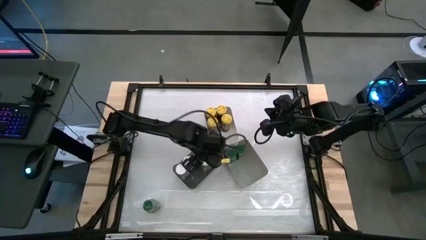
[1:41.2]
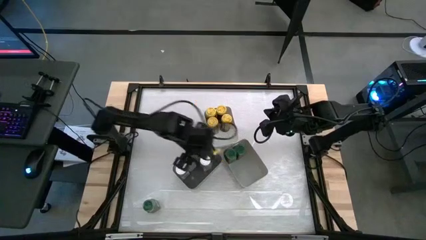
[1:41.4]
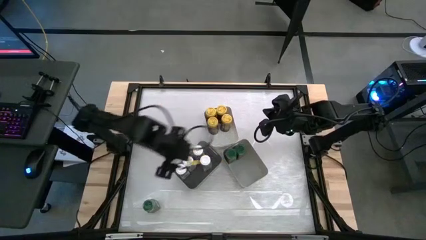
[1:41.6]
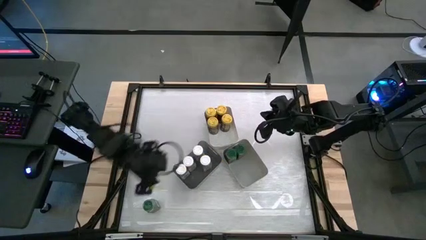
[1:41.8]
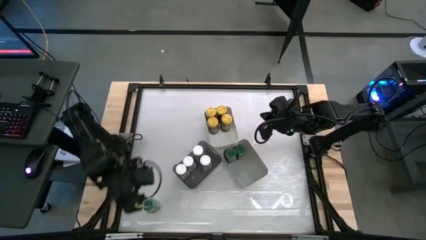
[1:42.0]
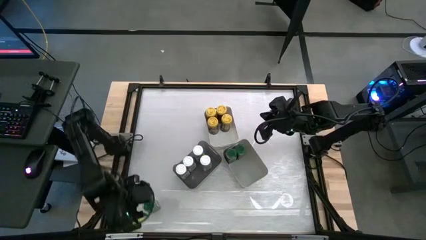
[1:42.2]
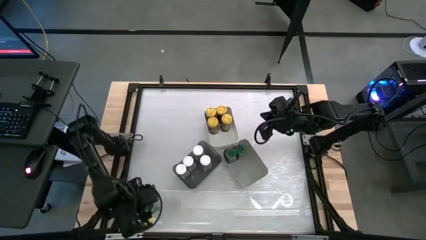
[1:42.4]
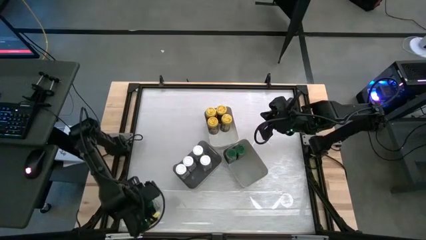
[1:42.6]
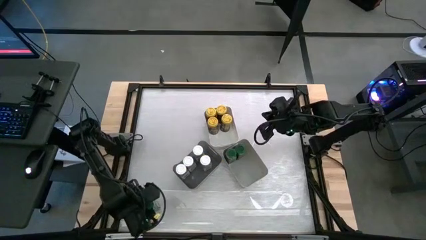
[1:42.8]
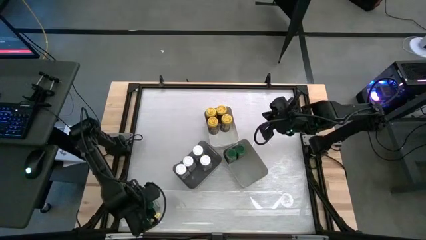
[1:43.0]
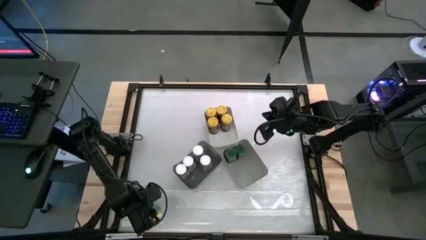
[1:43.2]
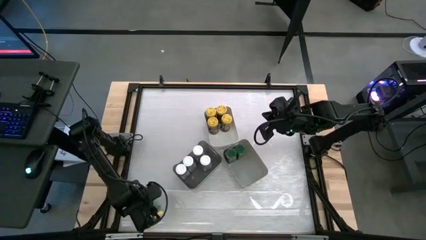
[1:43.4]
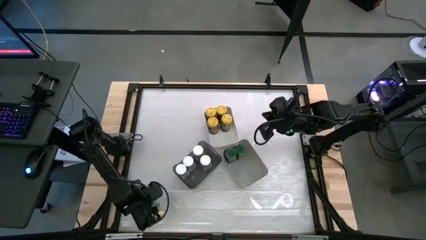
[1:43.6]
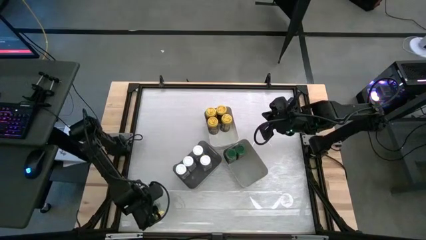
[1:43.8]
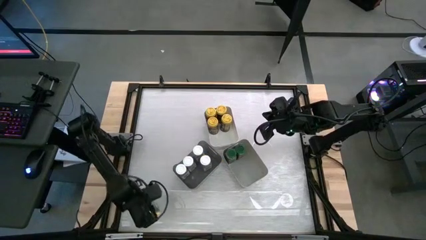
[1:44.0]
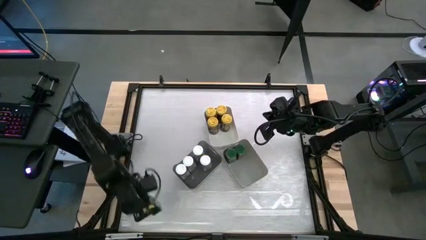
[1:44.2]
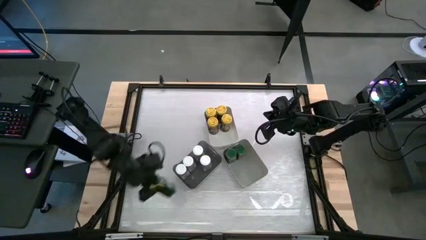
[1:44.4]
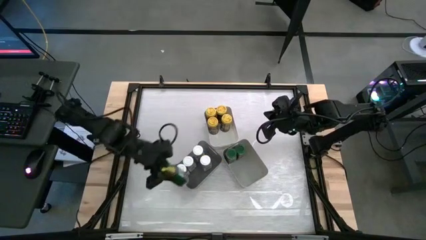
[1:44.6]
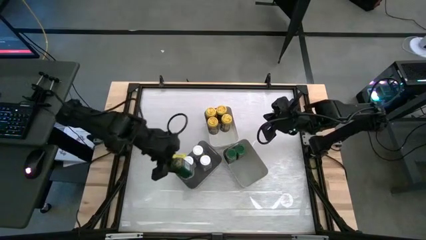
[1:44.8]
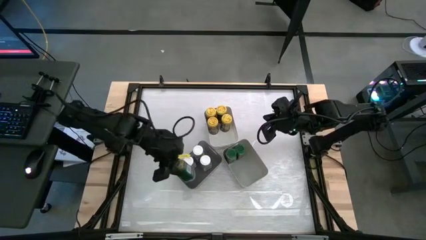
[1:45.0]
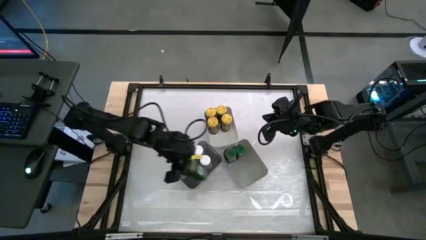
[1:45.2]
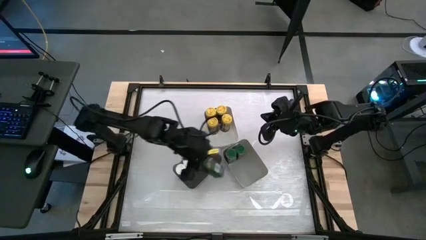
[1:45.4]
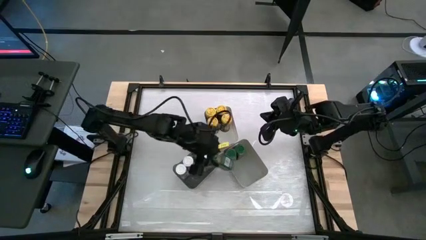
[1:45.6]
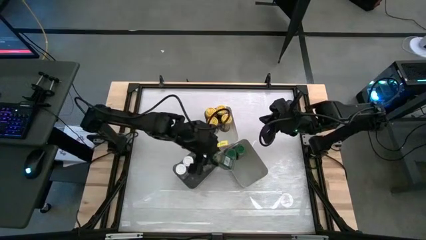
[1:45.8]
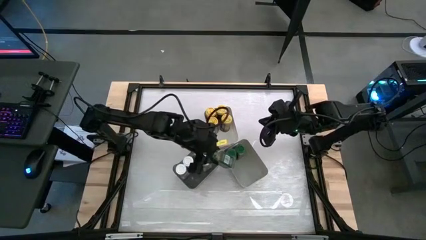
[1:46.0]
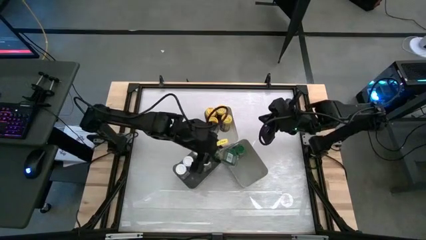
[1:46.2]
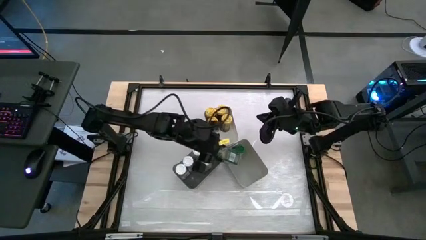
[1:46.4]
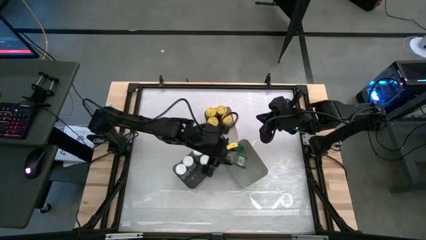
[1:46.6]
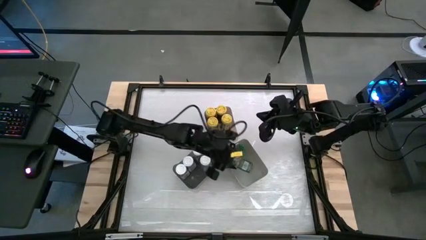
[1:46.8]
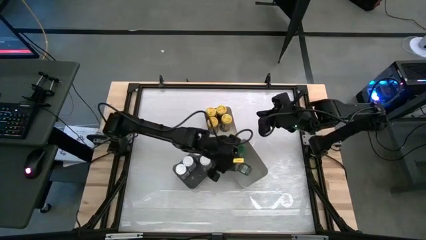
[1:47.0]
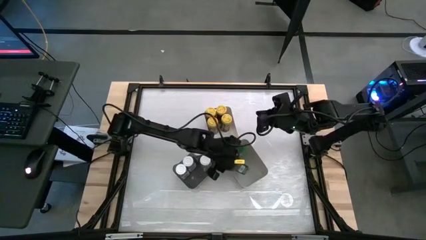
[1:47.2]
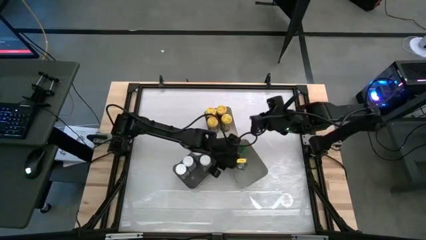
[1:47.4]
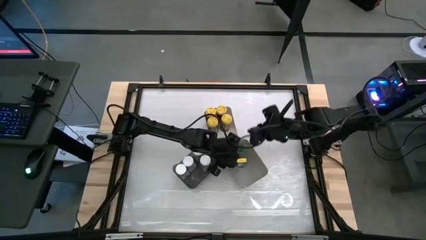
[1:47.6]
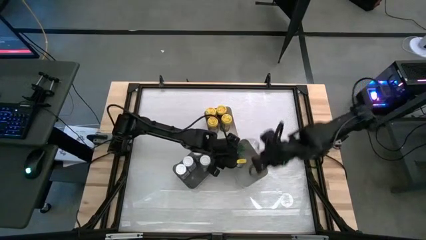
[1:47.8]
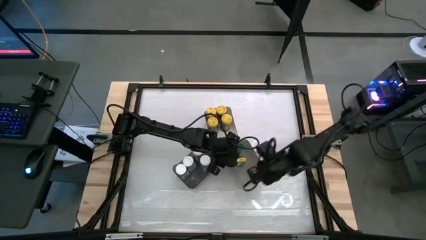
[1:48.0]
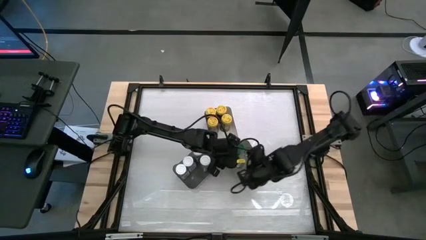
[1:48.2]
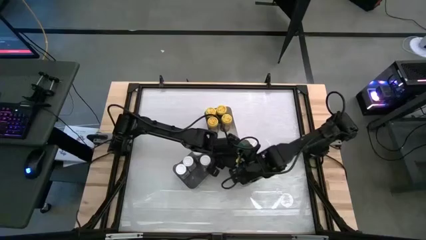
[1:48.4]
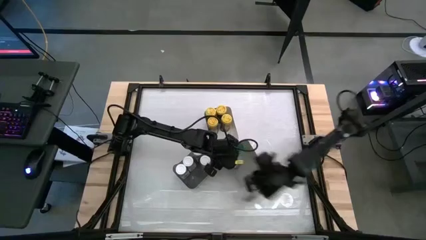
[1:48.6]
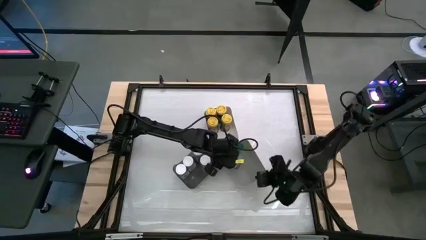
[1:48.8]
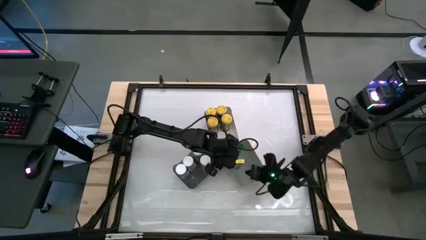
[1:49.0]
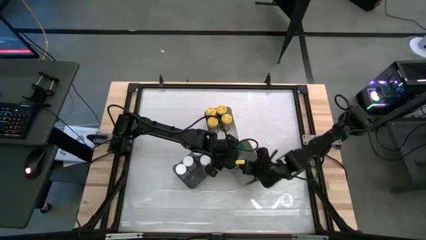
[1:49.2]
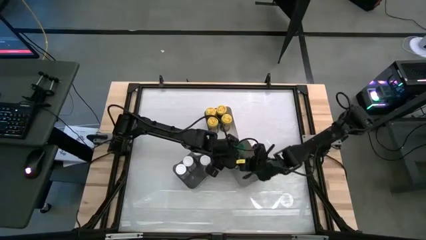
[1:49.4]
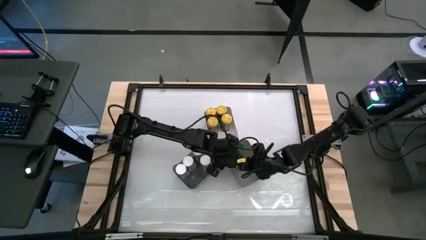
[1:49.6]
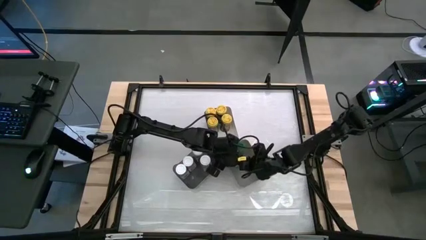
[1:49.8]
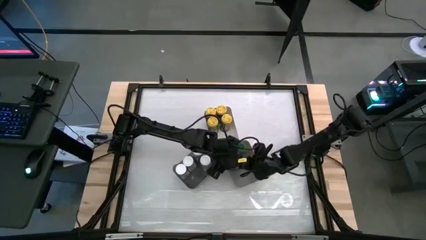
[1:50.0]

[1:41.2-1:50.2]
Task: Sort spices by type
Put the green seasoning bottle into the gray bin

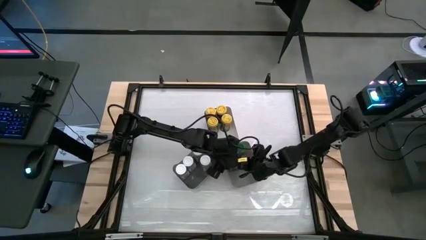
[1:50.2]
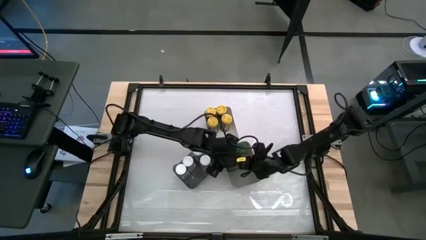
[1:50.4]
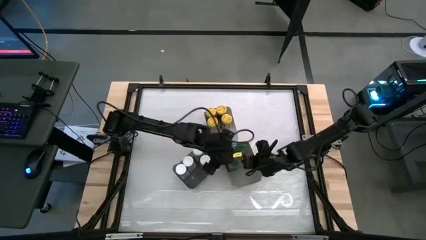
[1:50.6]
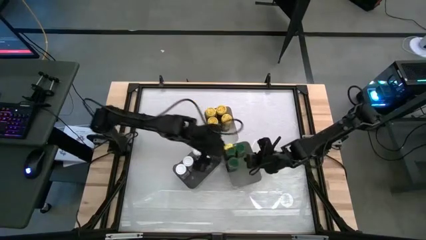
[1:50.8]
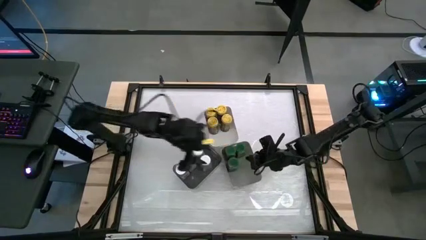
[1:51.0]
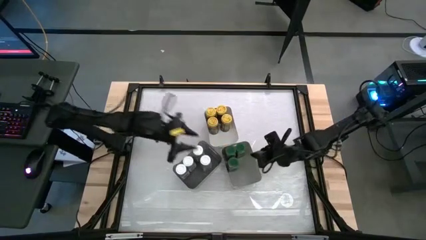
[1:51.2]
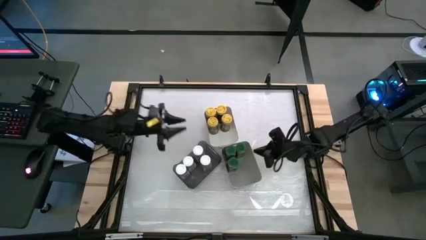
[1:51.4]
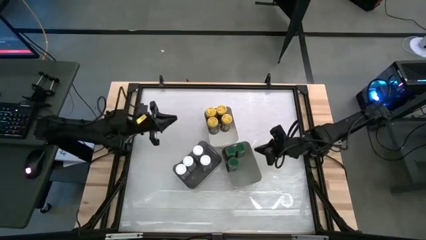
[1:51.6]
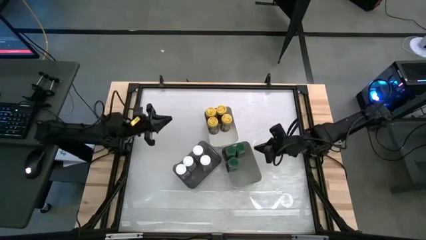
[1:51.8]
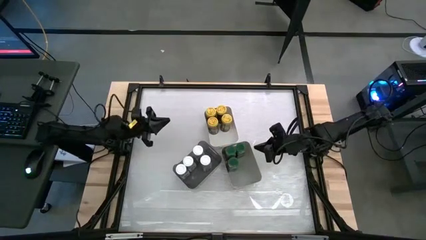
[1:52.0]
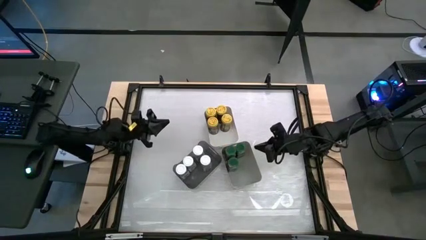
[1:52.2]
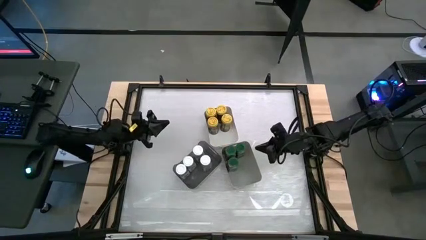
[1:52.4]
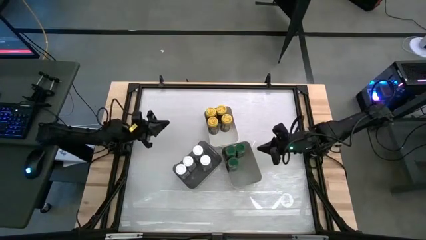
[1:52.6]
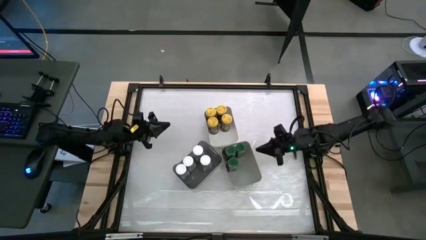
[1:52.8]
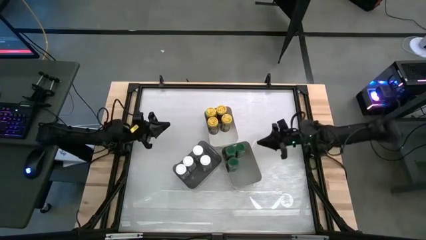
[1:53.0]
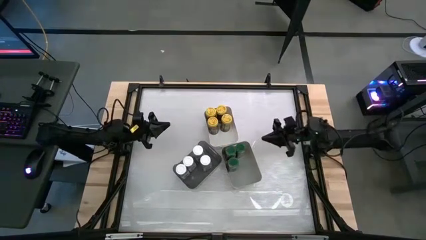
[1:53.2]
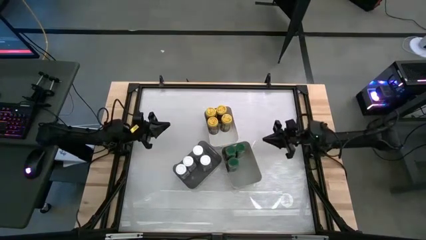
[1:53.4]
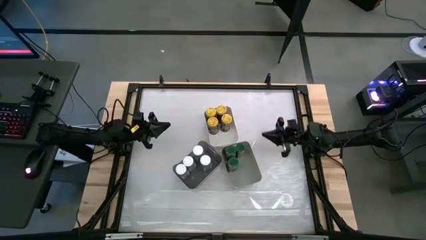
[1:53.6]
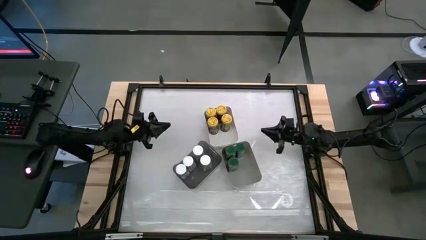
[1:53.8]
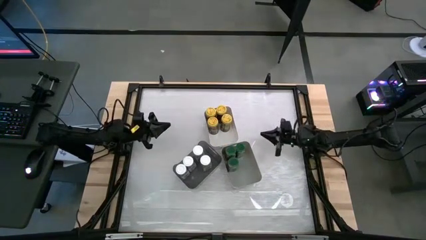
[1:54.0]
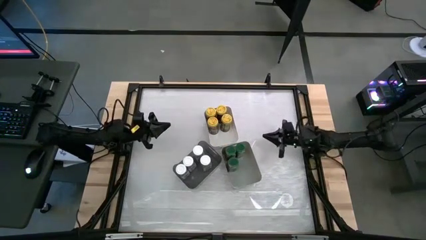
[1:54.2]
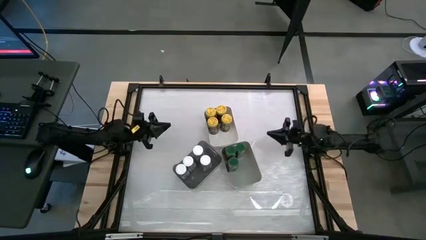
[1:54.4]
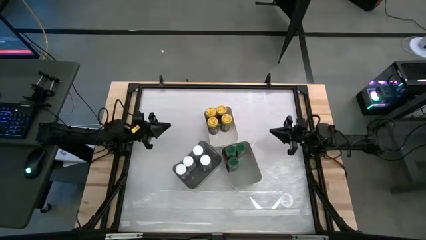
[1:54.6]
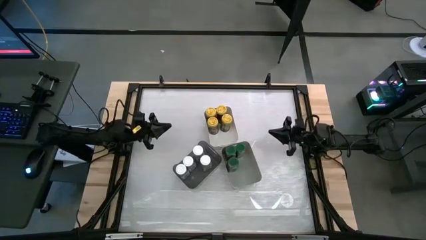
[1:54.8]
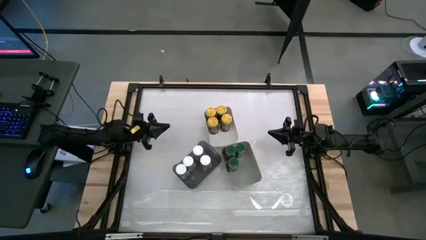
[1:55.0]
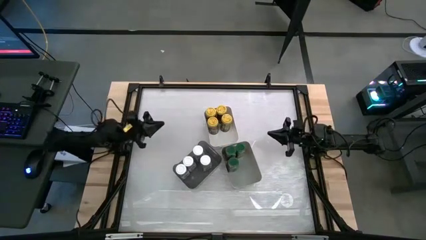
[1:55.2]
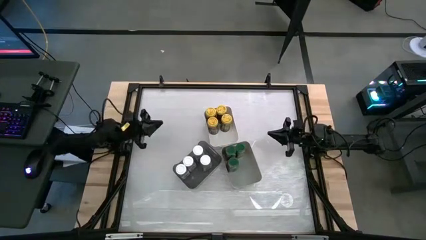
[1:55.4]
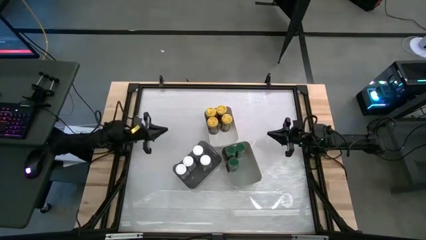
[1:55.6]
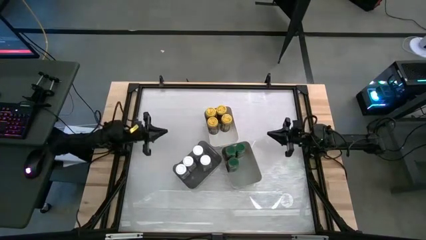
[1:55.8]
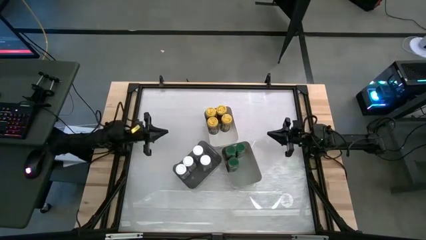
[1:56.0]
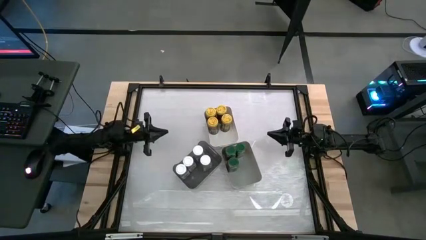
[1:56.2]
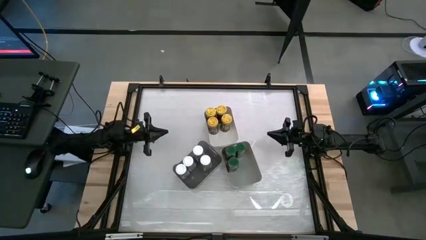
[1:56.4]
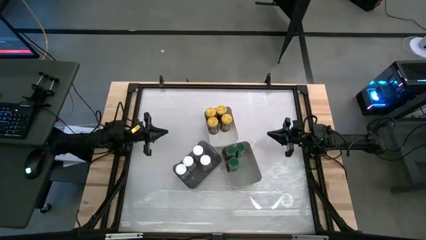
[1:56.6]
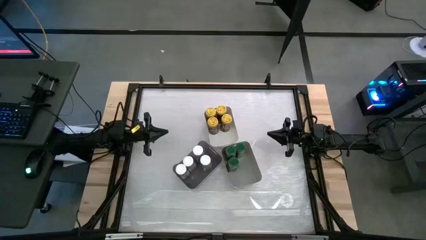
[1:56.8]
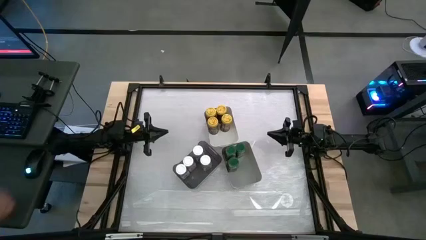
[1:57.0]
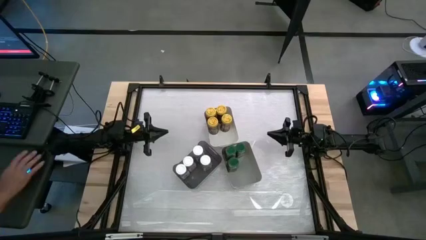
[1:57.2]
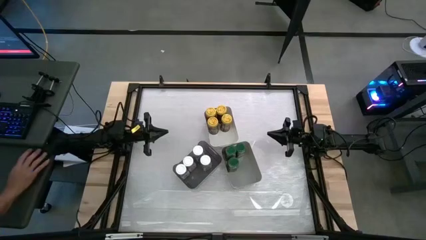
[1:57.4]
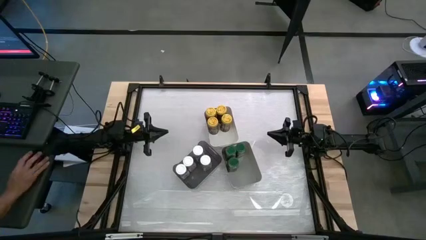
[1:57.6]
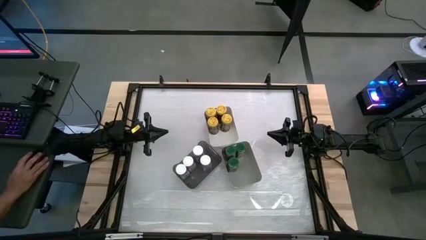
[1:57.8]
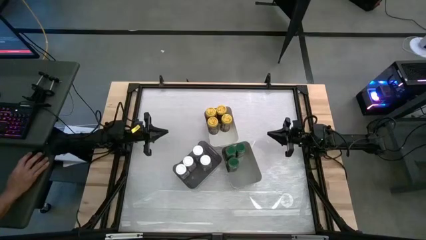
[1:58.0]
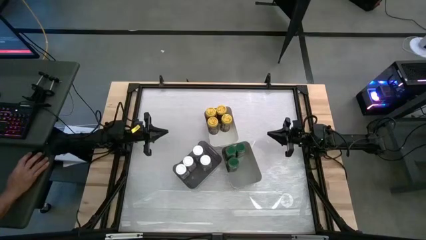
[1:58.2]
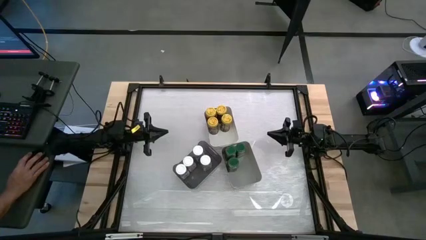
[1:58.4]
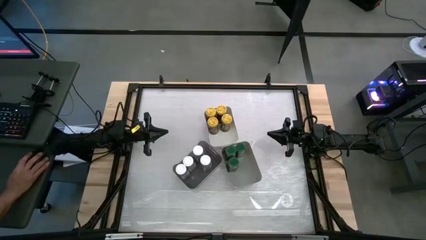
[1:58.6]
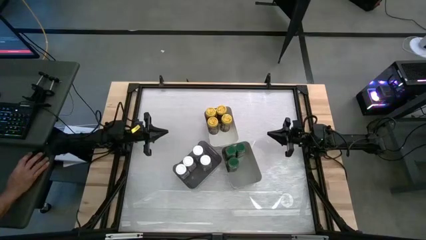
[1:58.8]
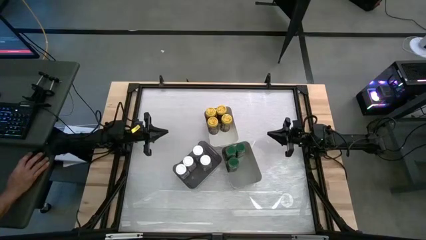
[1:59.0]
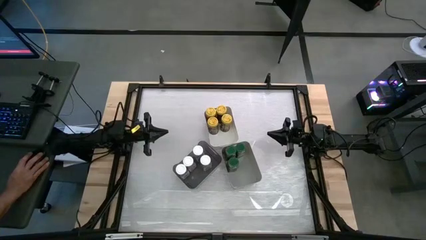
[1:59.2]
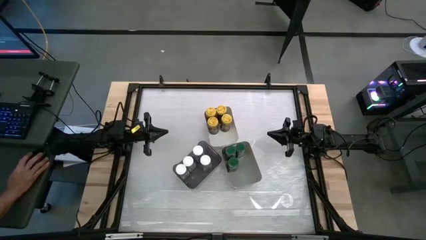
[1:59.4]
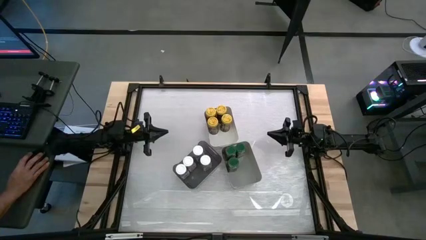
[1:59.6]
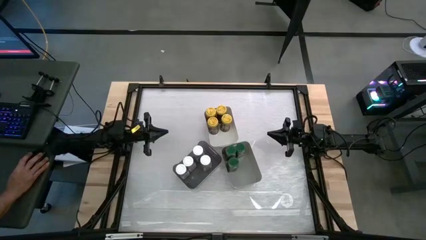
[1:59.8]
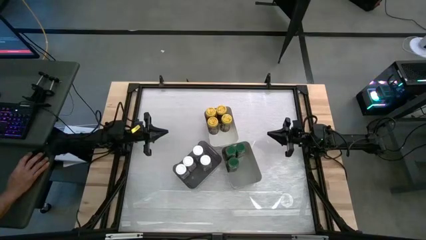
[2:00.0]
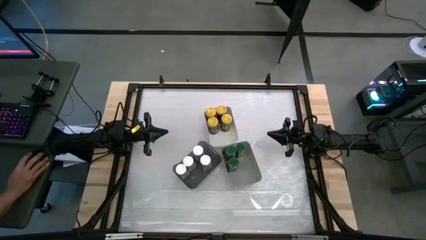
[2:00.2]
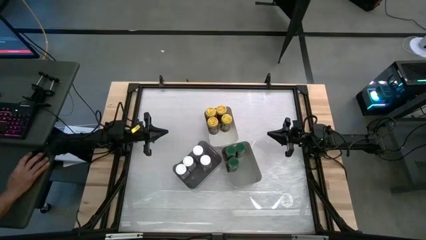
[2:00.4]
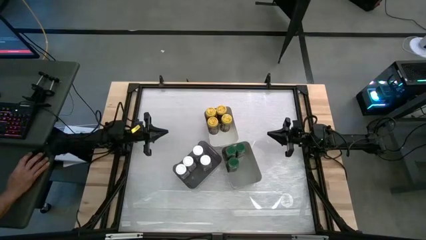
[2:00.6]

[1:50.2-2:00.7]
Return to Home Position
